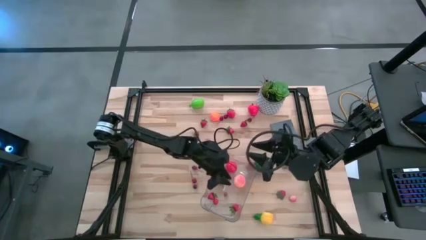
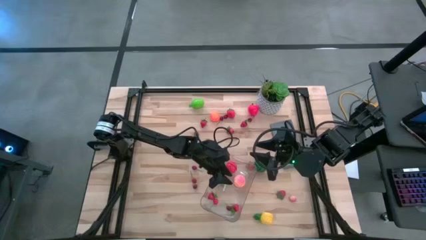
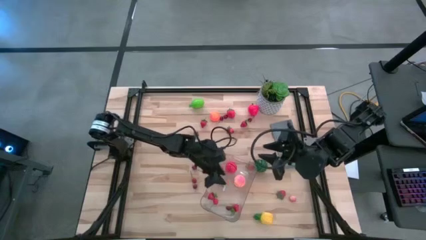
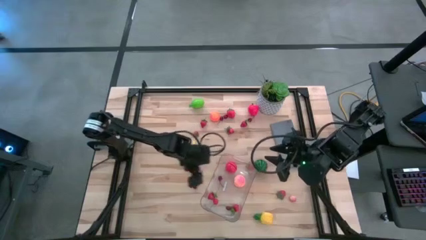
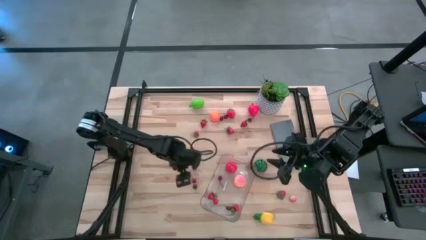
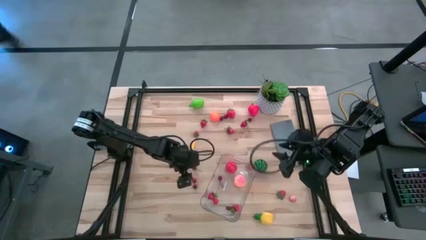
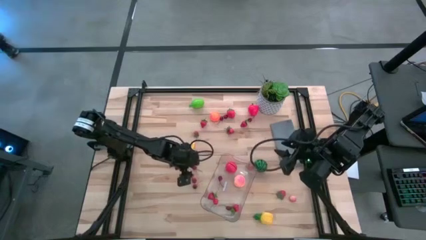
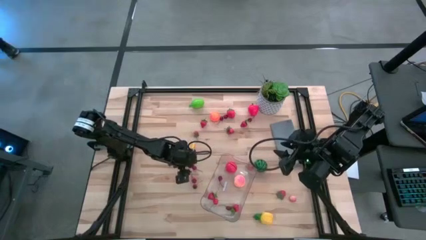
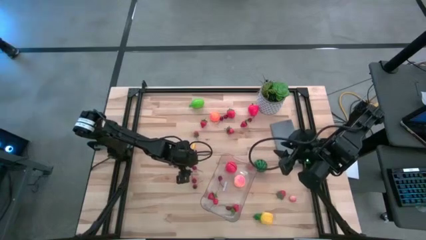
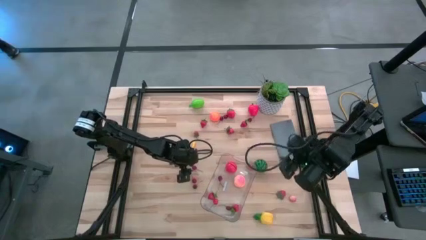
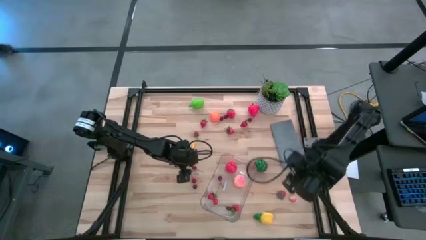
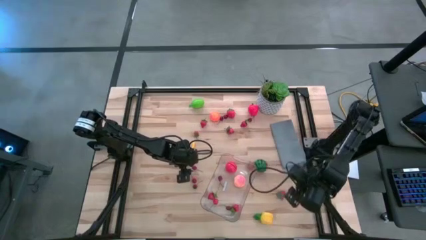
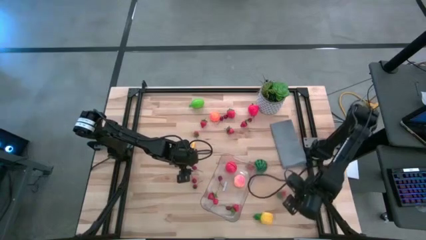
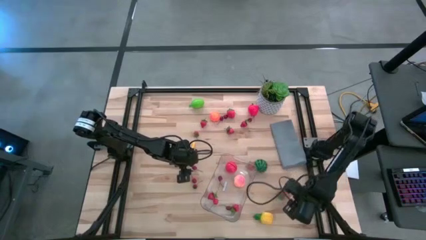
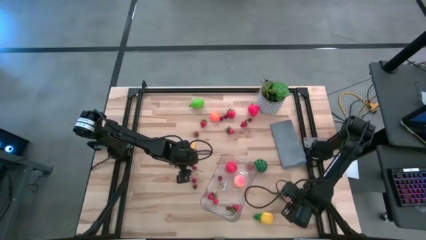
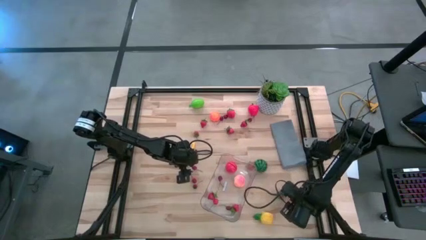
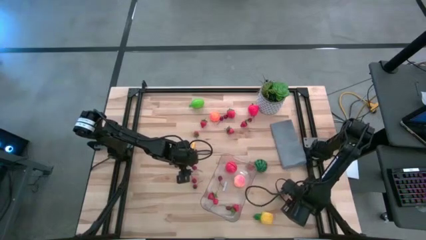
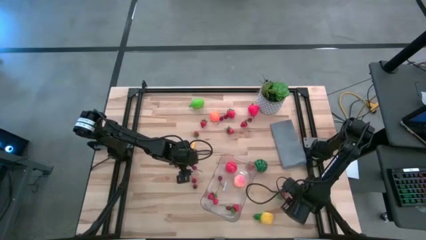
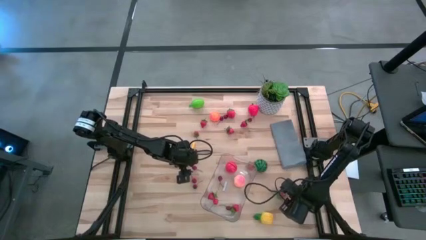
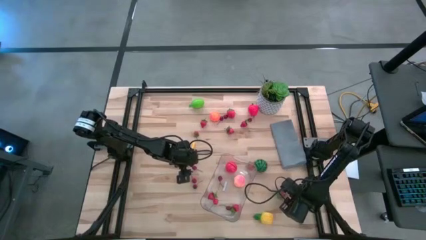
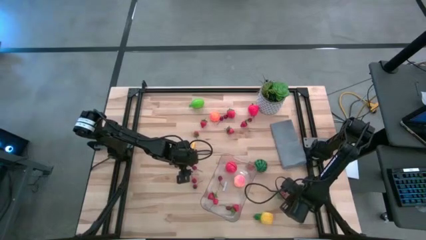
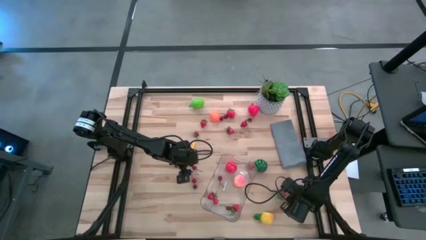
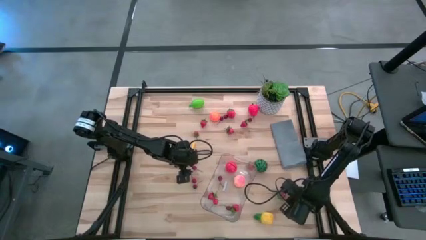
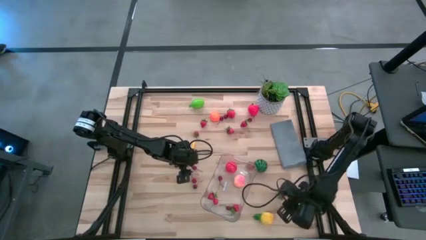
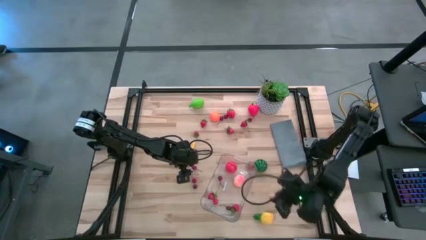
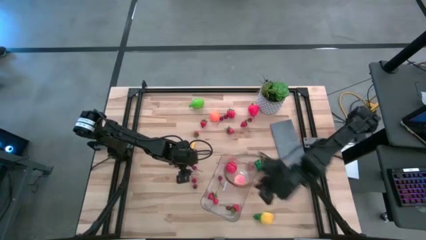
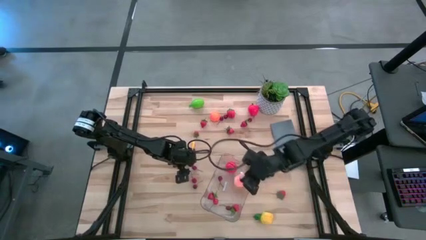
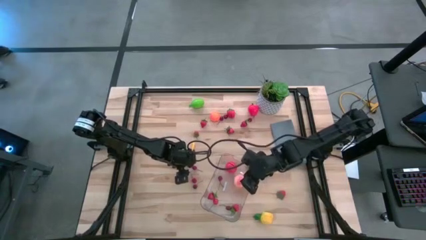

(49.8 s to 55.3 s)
Task: Pick and placing Produce into tupperware
Put the pink peach into the transparent basket

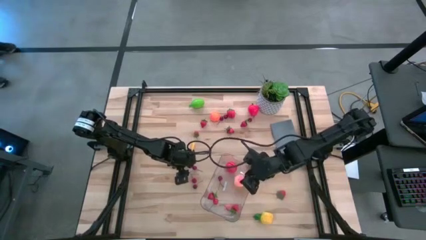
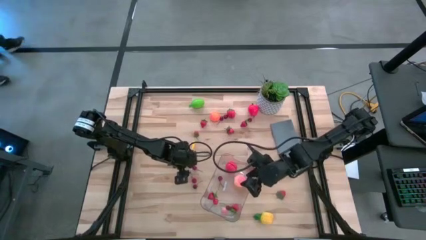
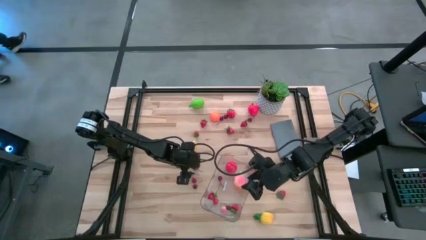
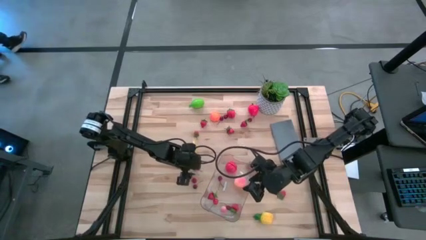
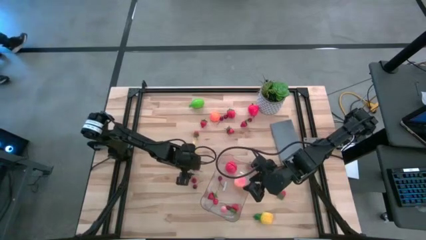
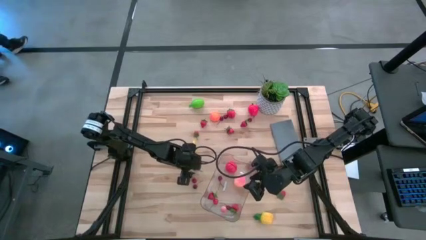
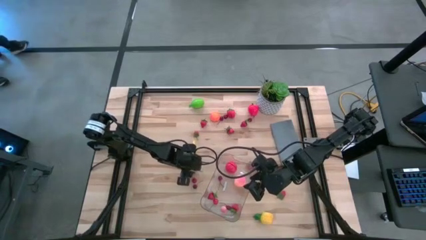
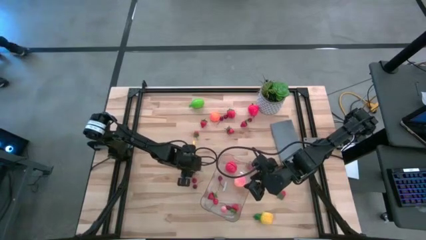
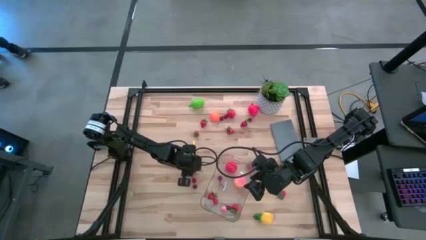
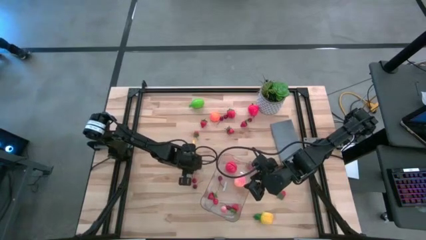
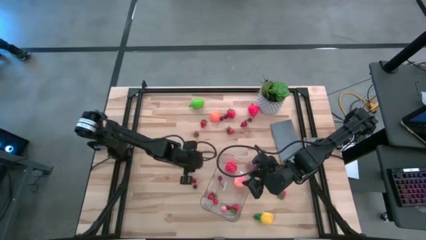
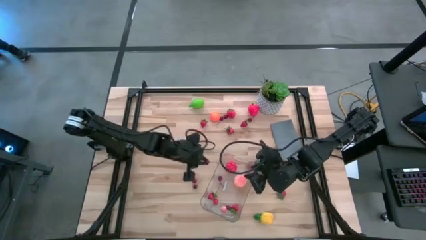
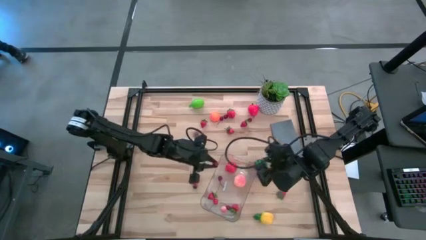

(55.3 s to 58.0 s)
Put the red cherry into the transparent basket

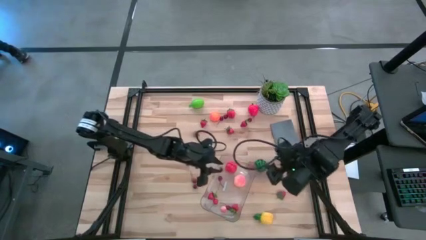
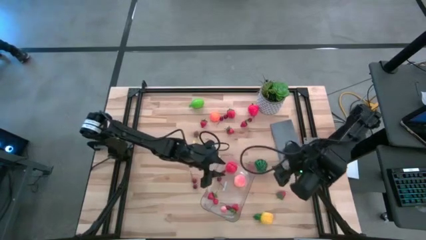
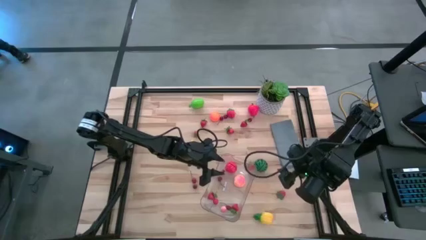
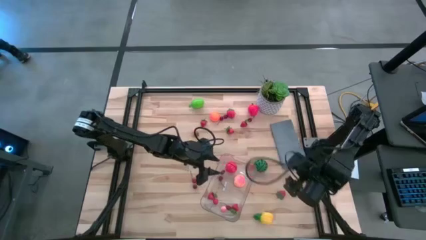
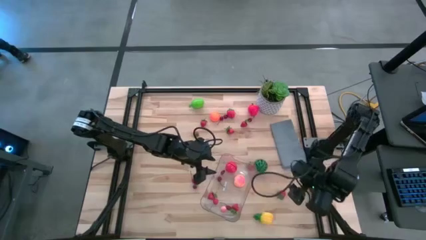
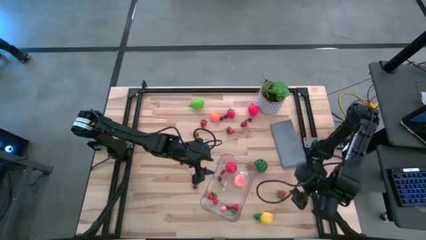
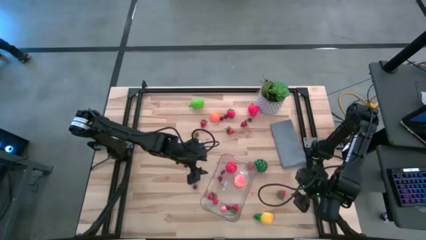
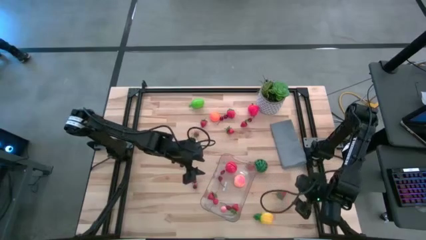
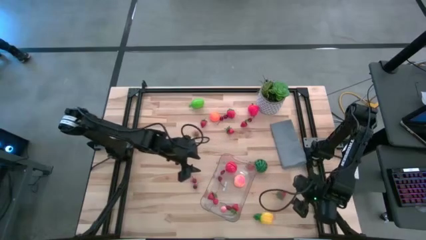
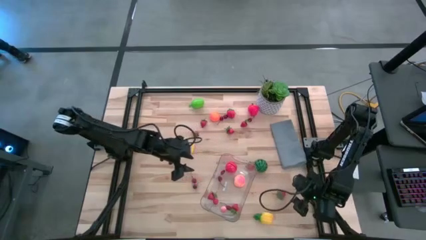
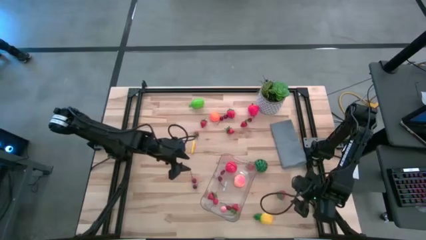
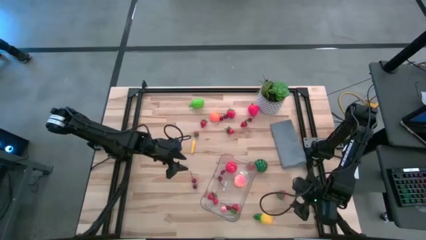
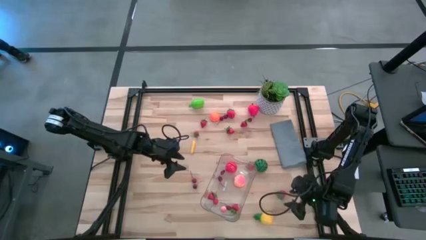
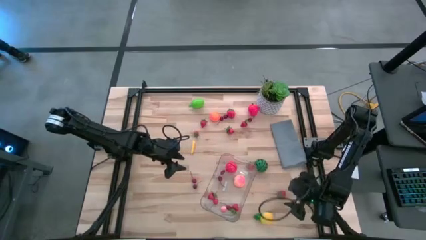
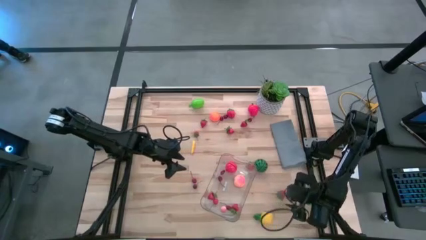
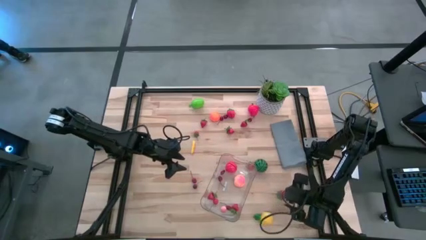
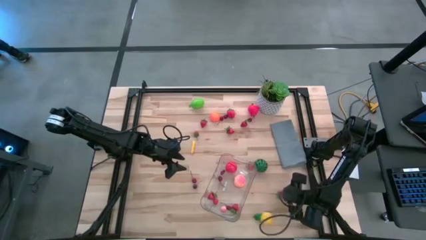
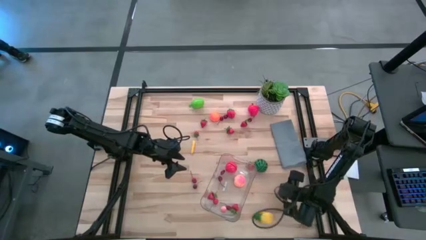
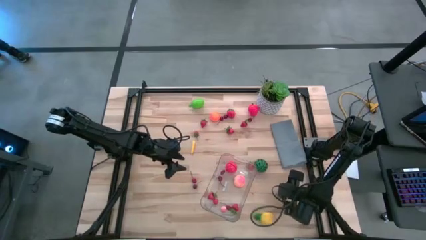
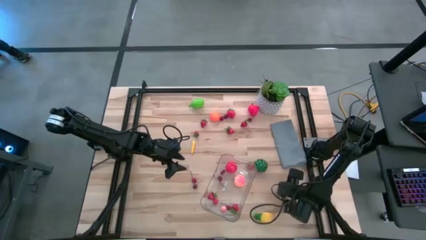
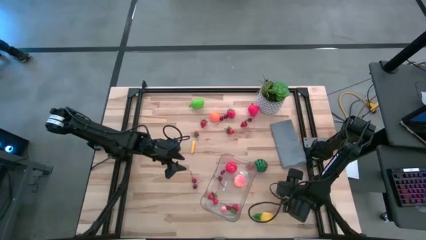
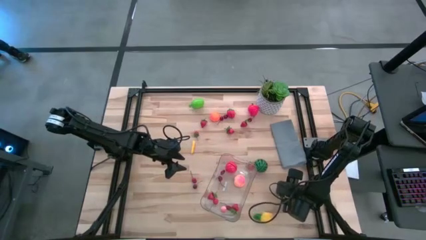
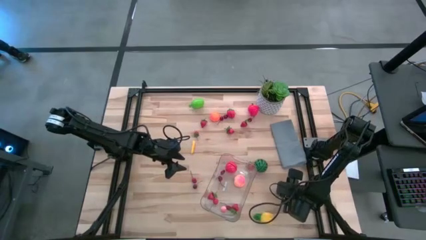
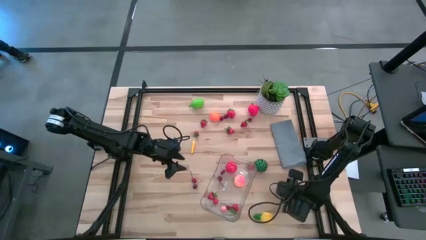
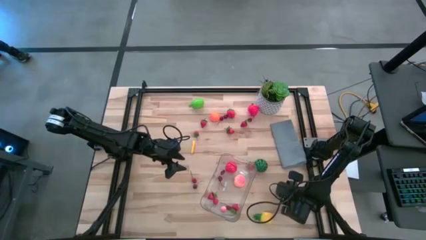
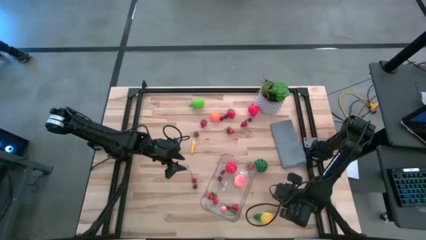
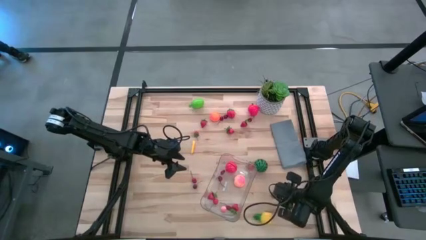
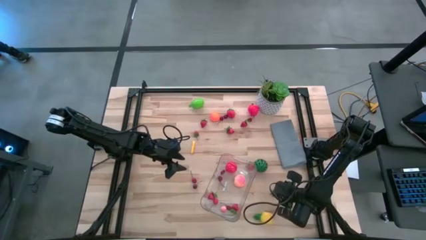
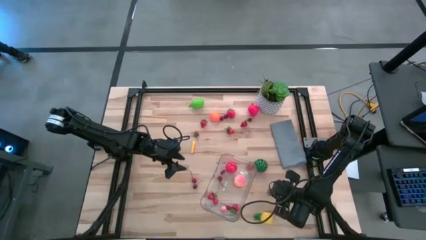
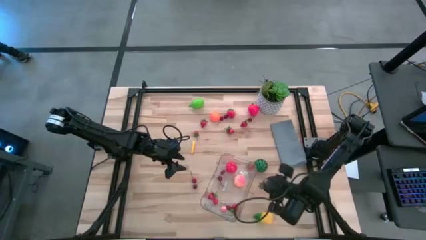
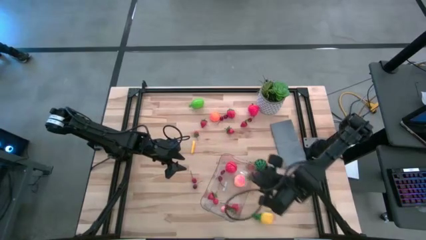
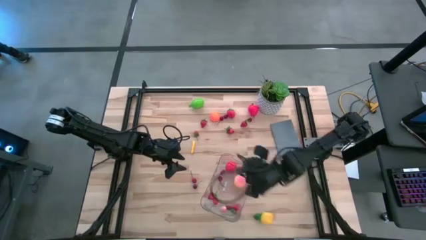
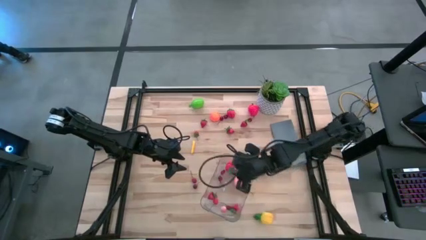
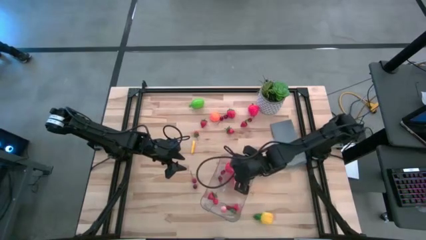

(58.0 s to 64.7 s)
Put the red strawberry into the transparent basket

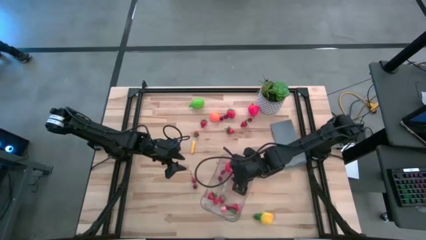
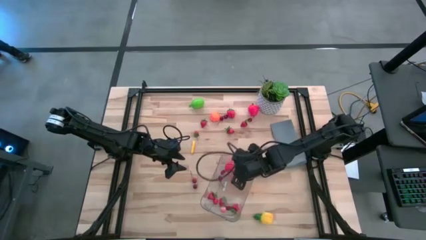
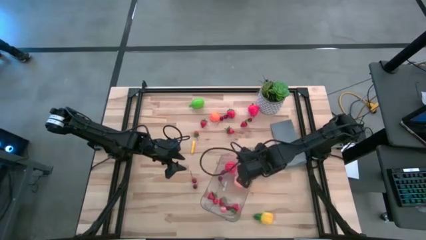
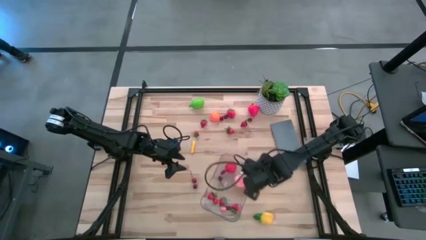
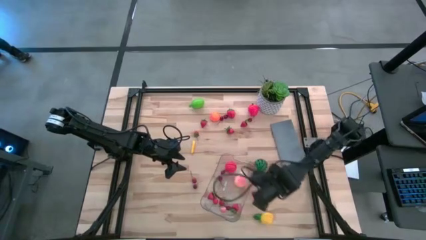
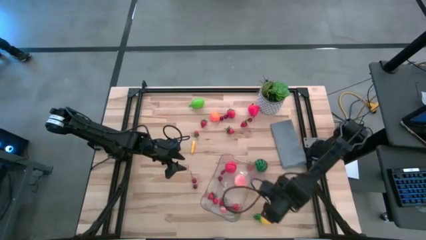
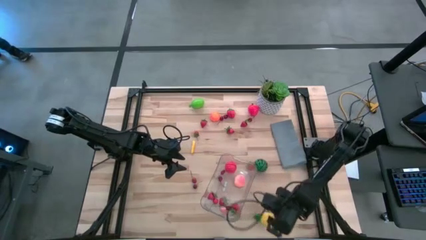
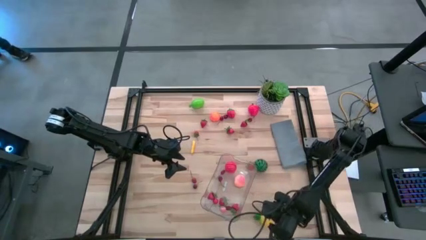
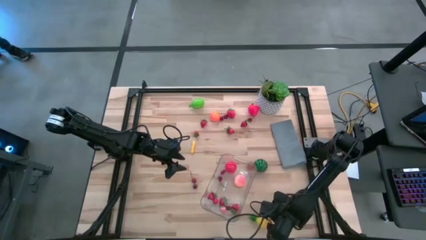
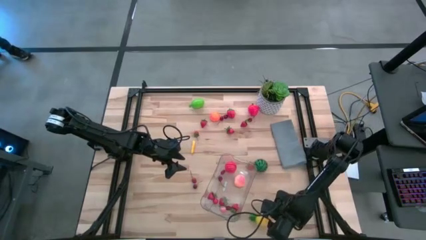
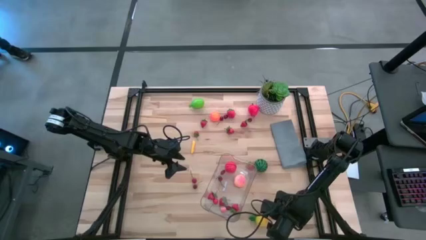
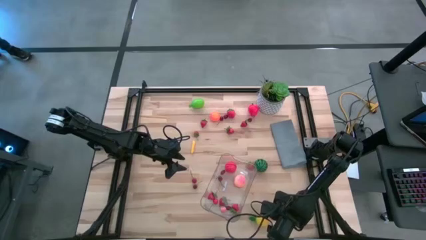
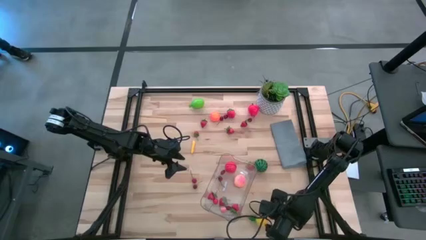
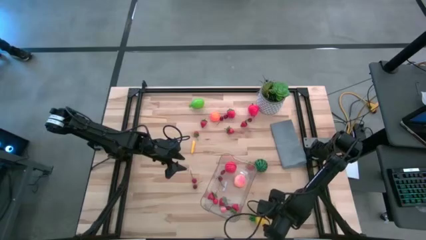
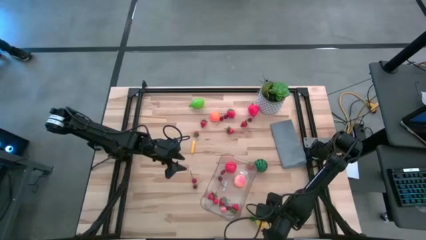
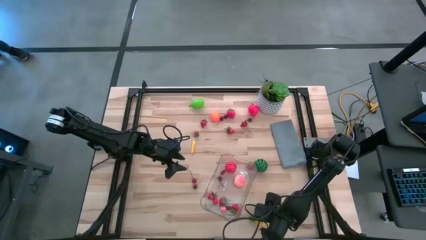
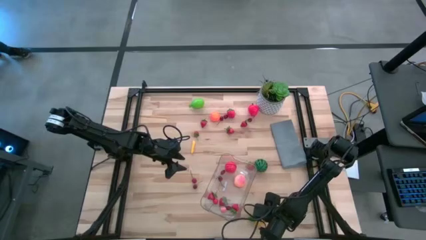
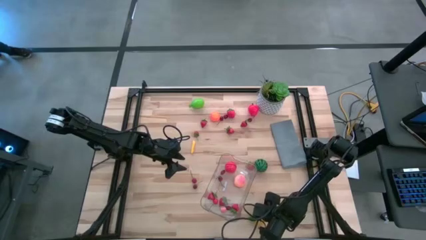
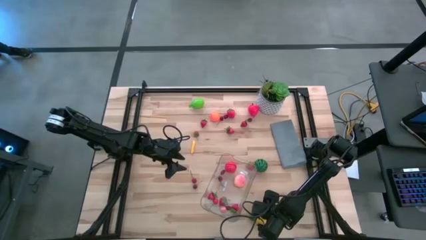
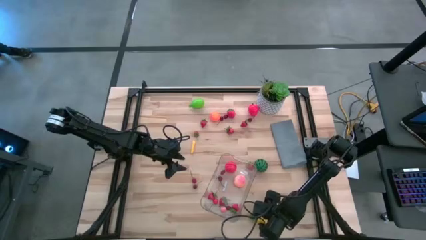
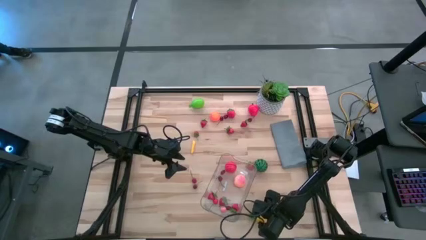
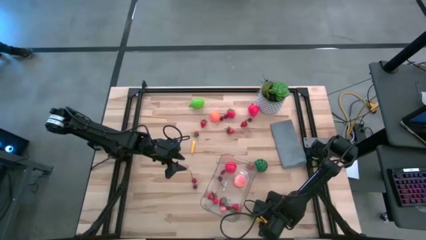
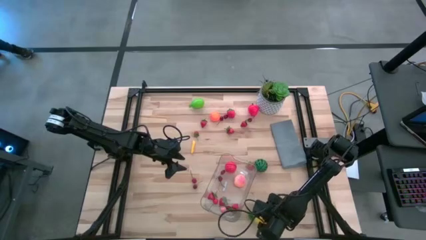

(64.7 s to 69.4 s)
Put the yellow pineapple into the transparent basket
